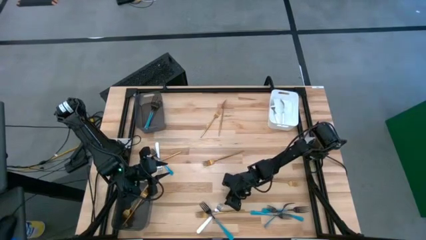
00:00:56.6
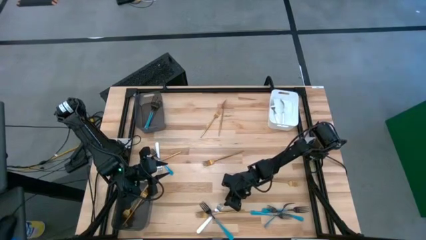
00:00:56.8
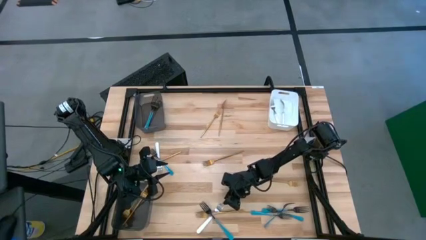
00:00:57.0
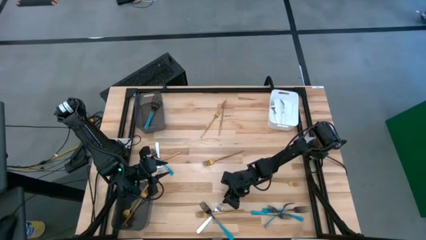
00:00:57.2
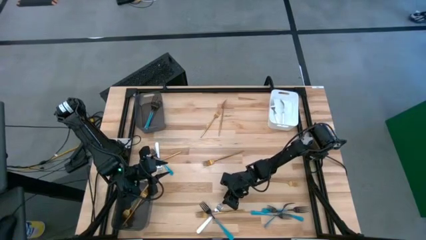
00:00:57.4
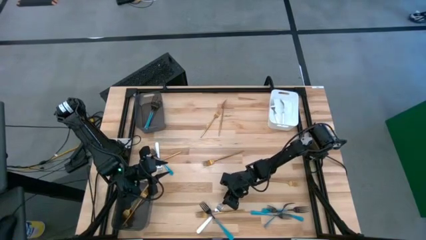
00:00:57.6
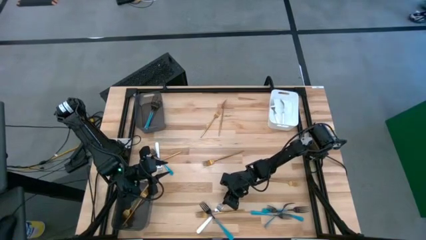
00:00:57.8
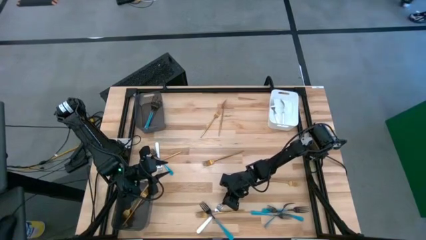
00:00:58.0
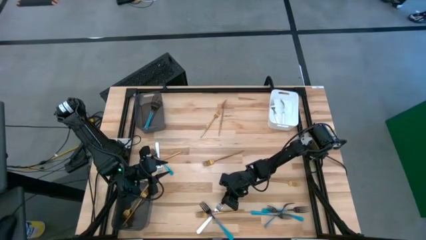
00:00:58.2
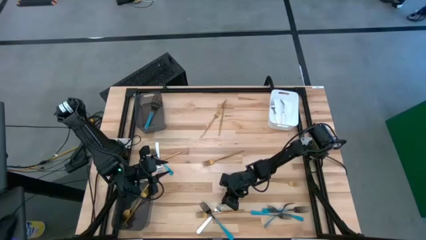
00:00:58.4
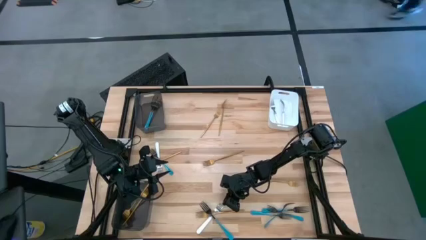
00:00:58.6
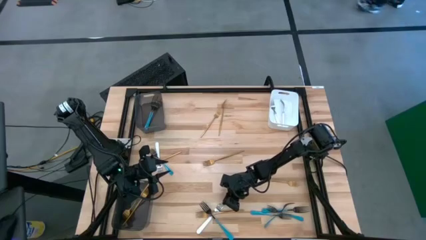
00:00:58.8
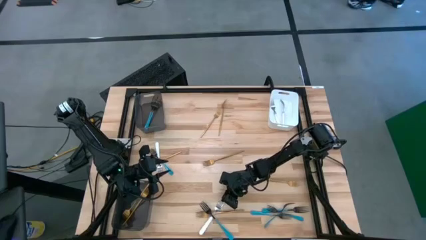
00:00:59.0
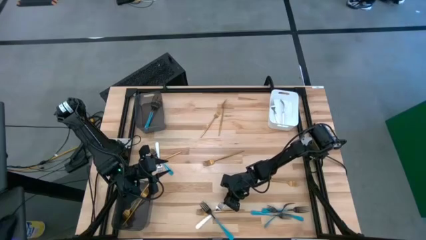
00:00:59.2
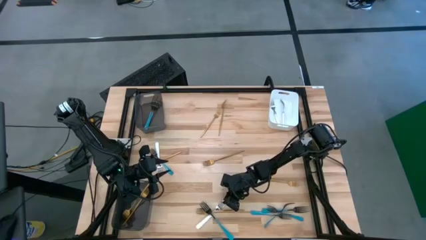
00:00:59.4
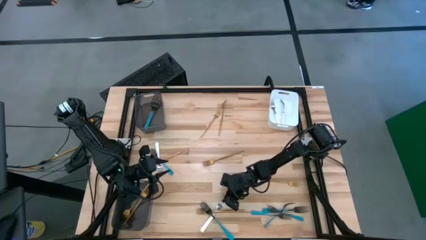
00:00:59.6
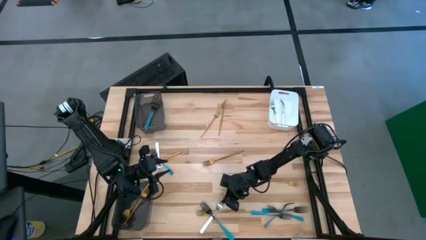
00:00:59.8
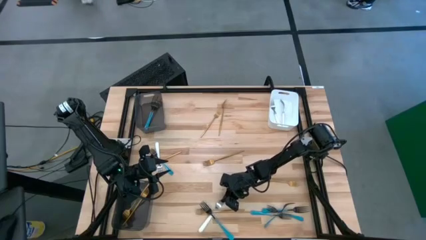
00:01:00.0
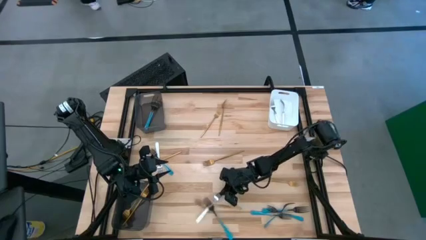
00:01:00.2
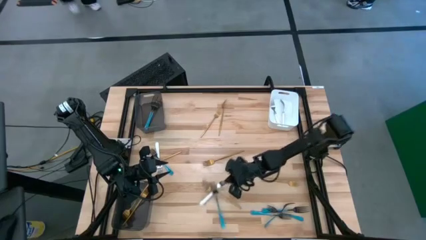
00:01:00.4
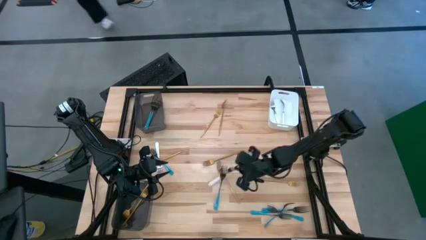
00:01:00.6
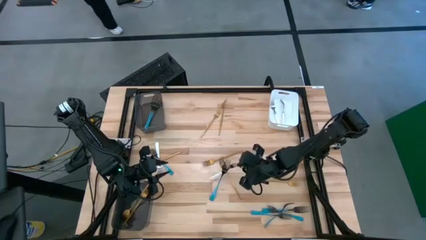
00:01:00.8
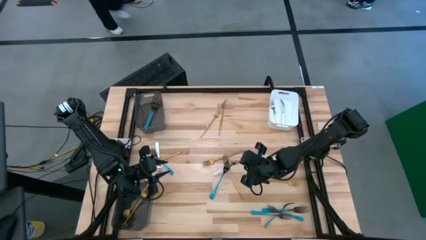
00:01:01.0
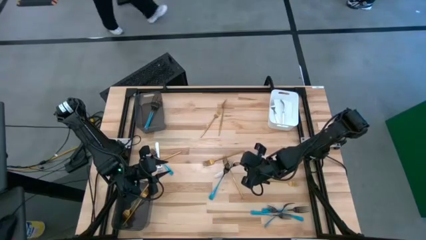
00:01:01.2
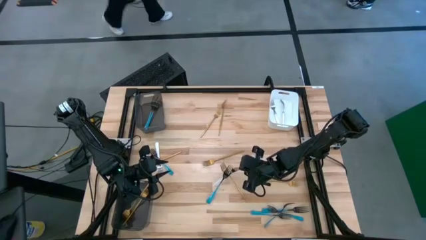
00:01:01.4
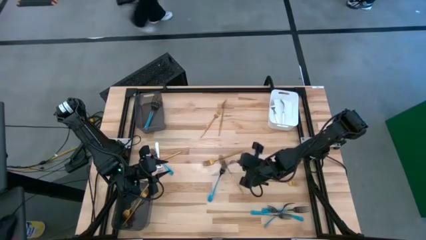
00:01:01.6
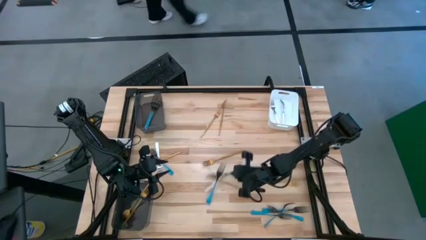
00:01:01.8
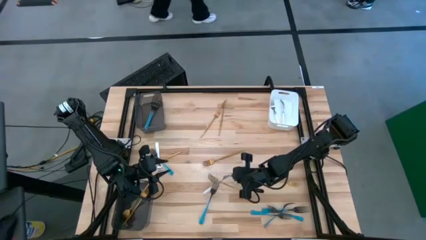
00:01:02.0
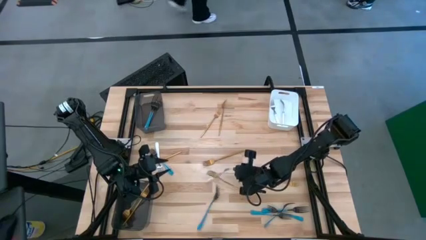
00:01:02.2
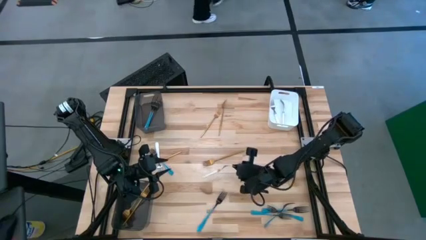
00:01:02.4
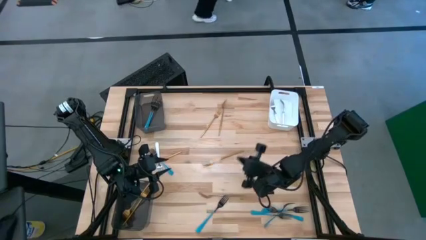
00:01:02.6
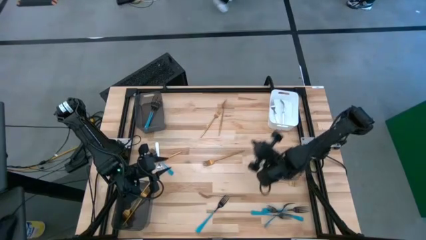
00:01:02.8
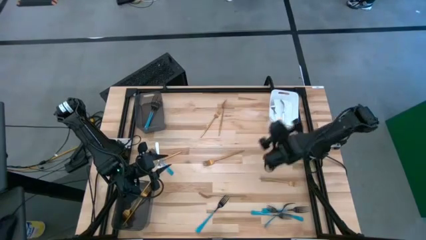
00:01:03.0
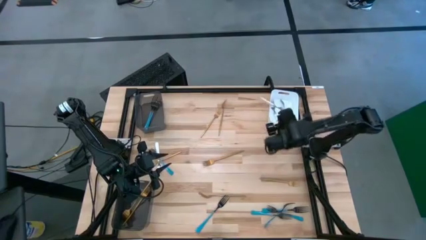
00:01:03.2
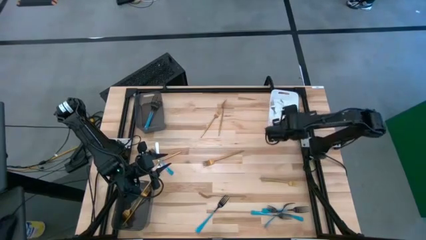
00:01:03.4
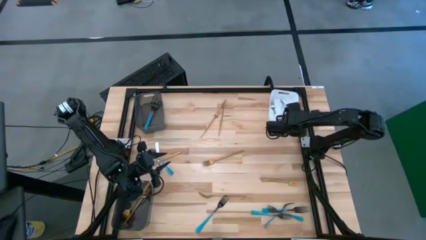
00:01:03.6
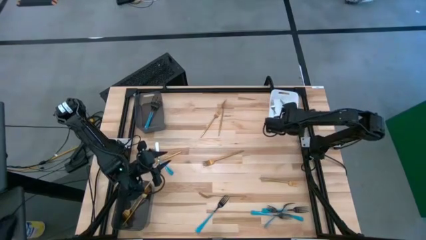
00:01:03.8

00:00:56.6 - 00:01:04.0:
Task: Sort silverware by color (type)
Put the white fork into the white bin

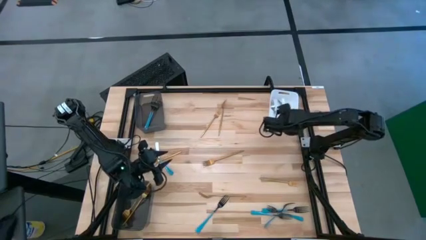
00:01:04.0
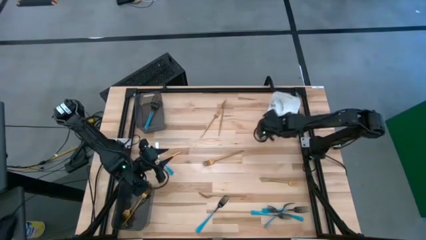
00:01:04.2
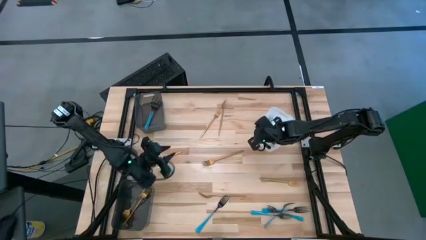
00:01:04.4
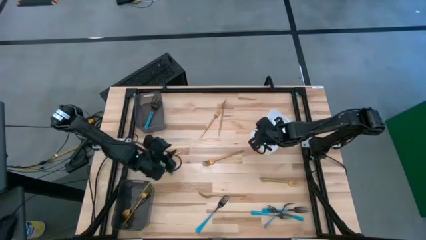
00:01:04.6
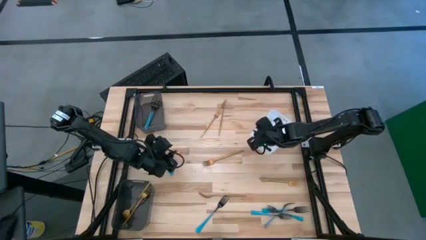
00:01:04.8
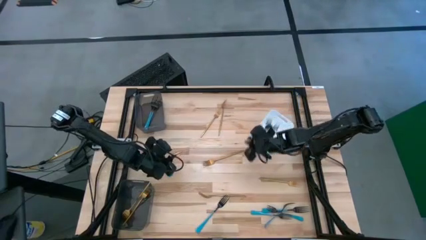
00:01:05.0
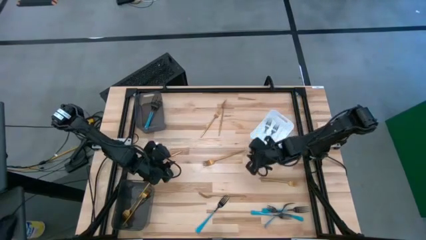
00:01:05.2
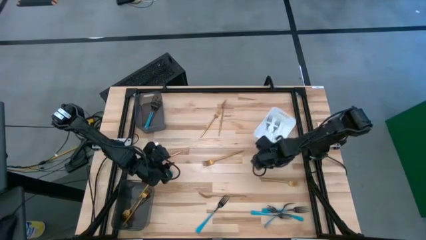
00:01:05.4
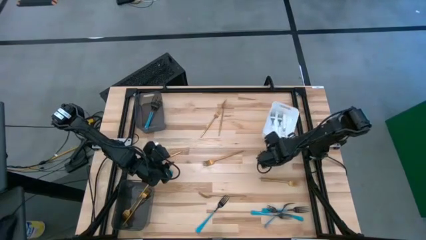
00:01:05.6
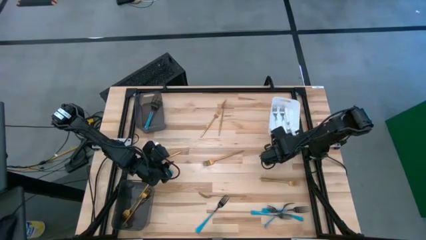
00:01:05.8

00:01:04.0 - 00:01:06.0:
Adjust the white bin

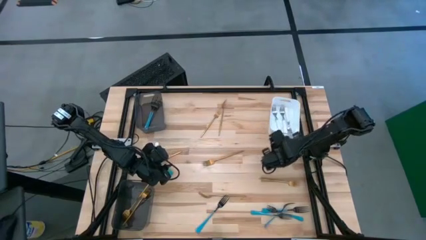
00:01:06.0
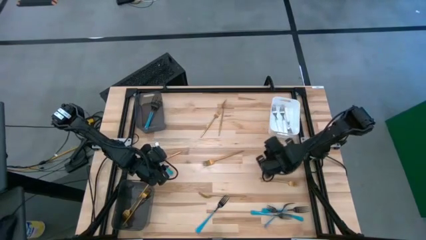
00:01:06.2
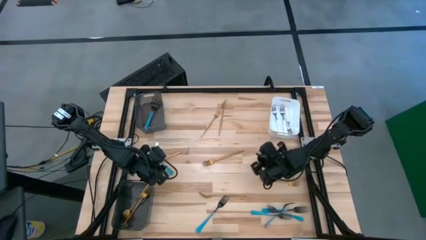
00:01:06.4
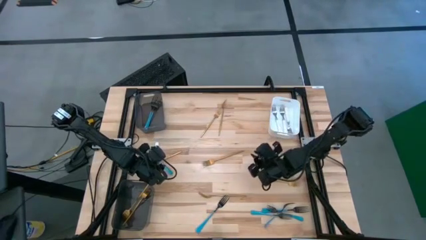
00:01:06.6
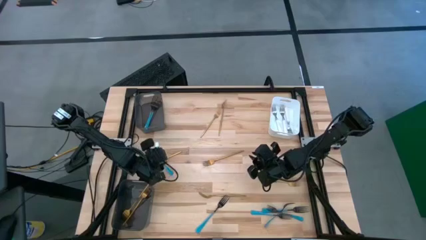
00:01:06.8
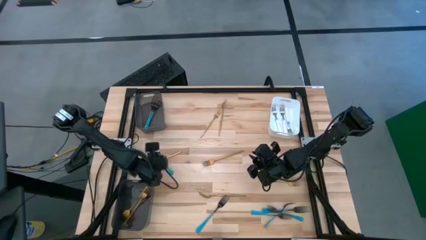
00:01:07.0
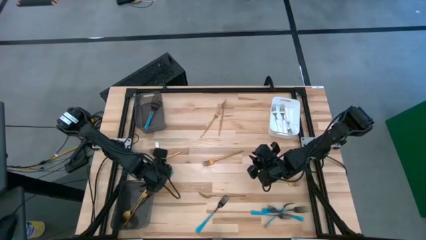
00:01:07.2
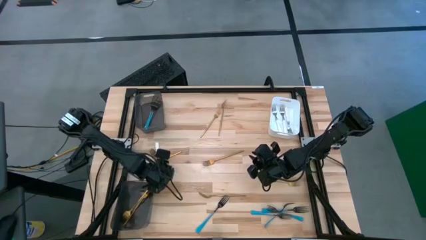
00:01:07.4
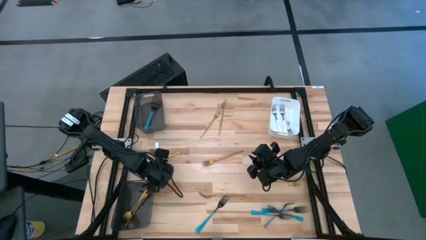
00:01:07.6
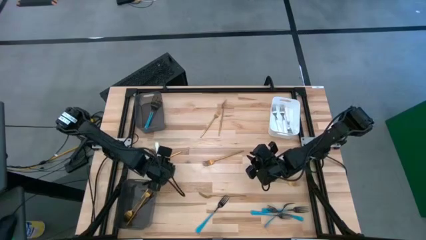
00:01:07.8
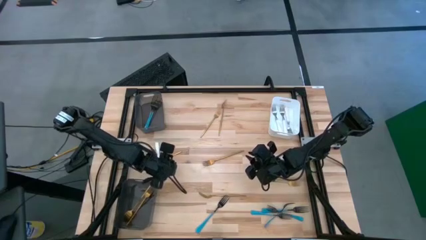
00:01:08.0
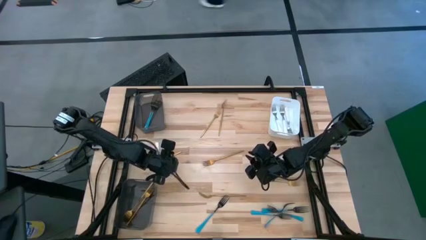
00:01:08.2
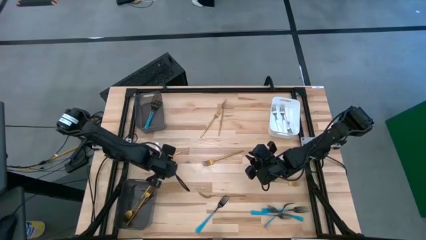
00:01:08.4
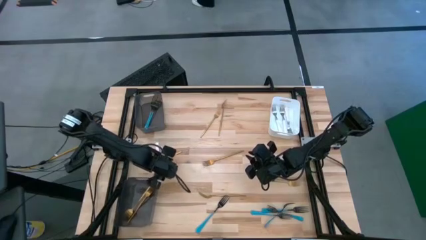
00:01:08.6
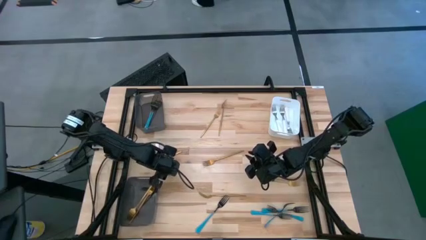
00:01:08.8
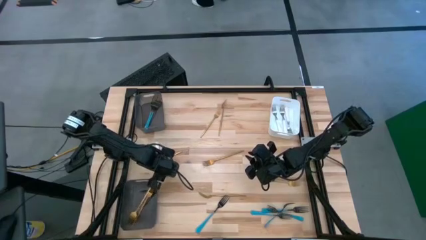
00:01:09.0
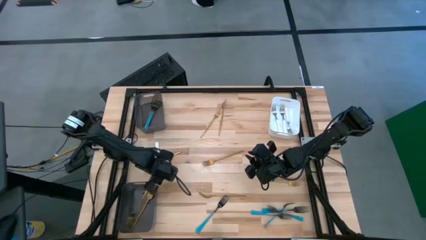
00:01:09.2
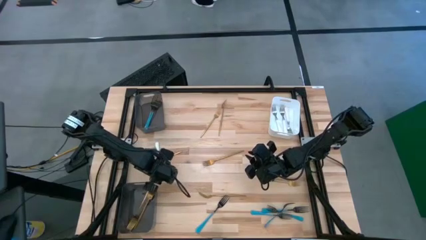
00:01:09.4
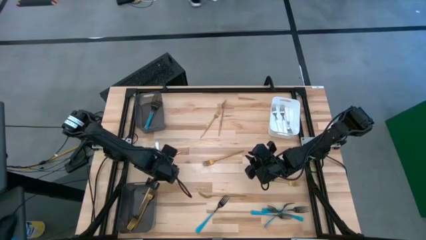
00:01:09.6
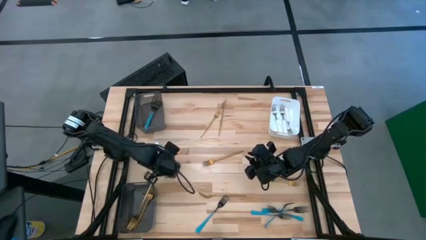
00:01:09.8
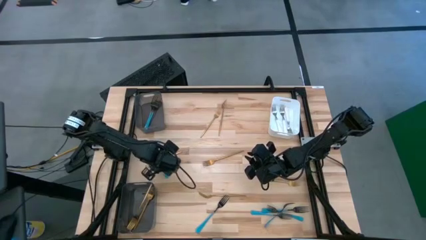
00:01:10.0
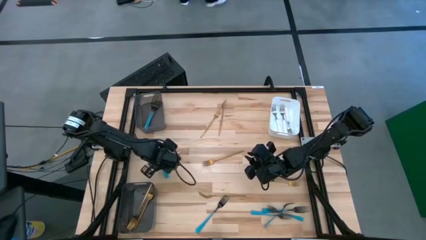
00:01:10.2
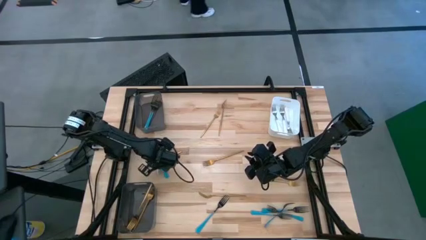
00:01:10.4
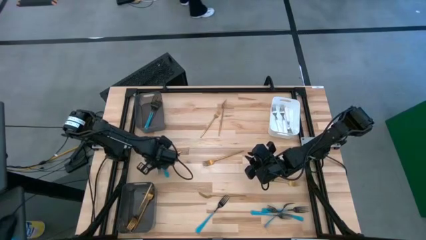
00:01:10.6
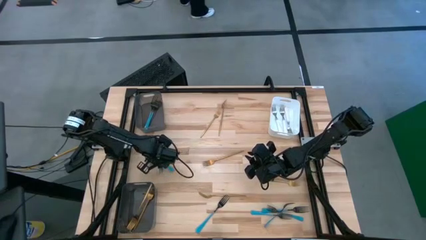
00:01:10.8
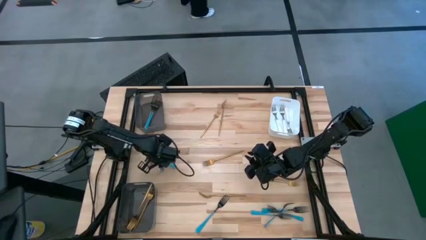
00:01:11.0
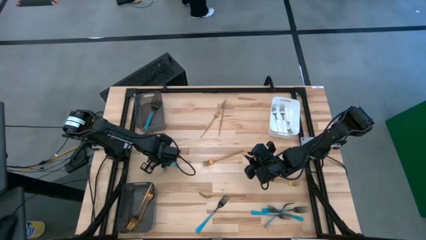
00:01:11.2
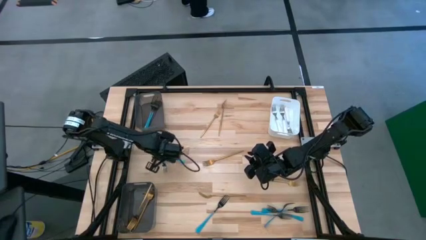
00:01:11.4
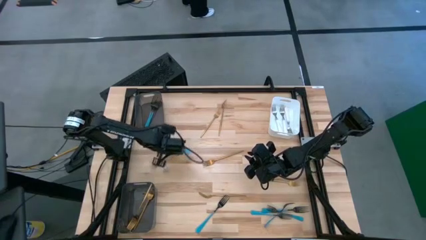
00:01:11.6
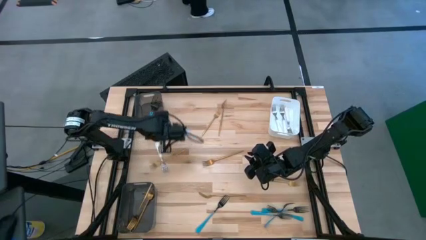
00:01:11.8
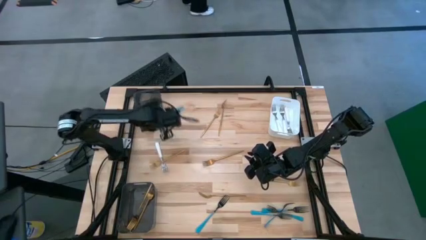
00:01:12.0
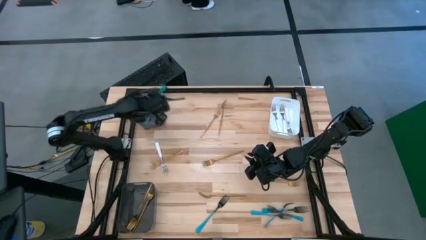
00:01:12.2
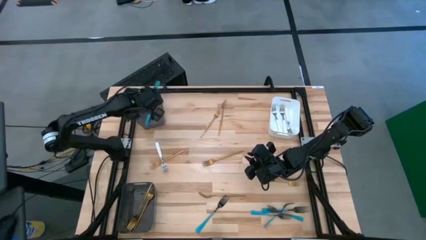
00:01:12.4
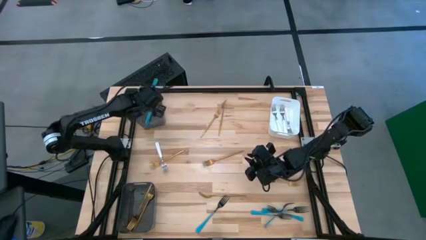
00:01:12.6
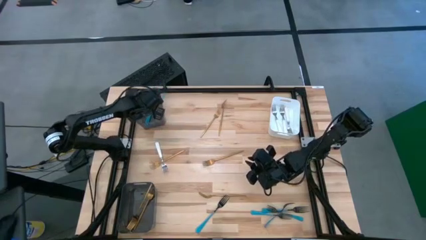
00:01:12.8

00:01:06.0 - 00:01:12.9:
Put the blue fork into the top black bin
